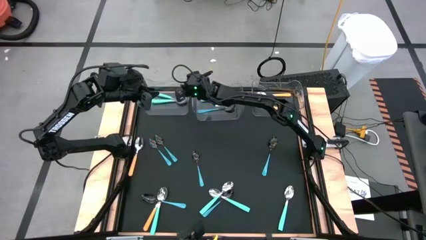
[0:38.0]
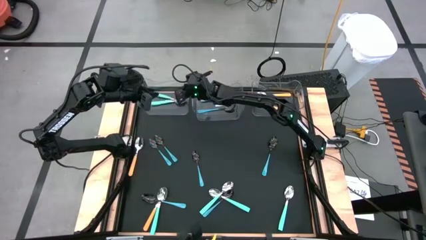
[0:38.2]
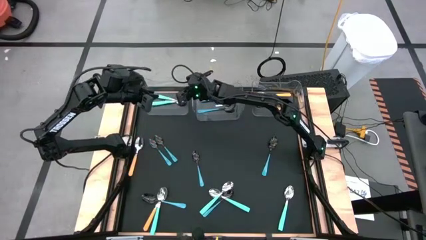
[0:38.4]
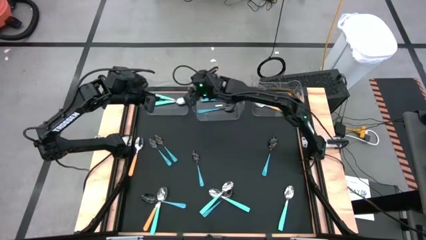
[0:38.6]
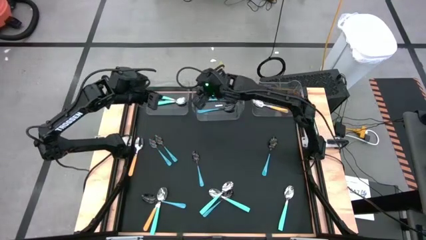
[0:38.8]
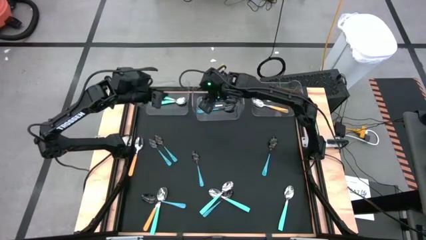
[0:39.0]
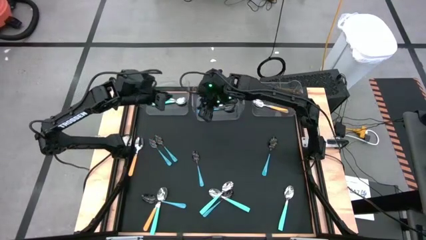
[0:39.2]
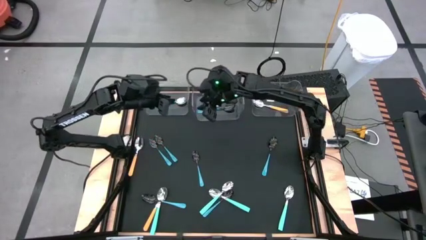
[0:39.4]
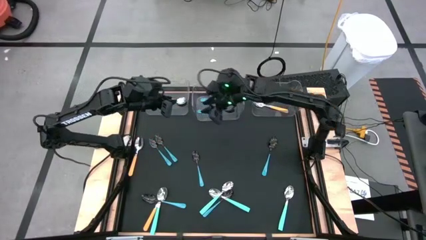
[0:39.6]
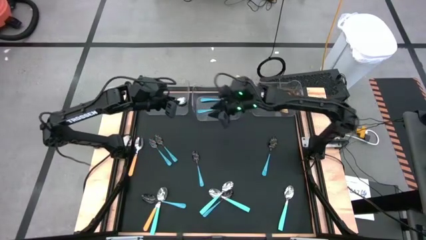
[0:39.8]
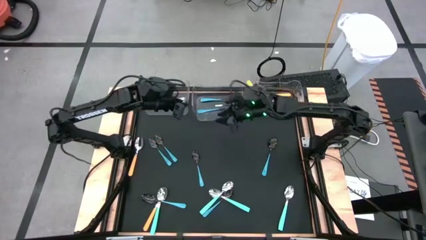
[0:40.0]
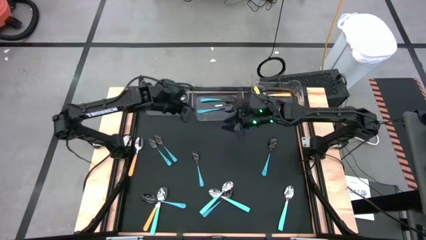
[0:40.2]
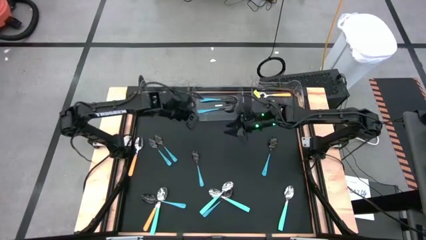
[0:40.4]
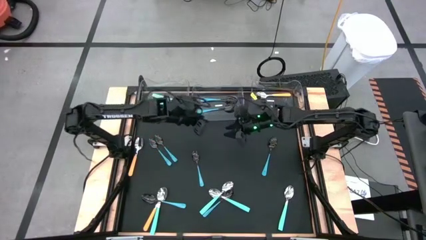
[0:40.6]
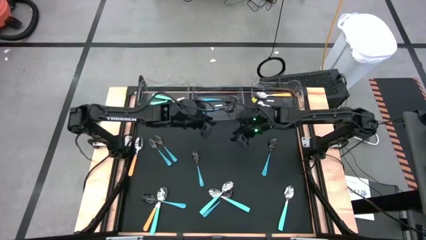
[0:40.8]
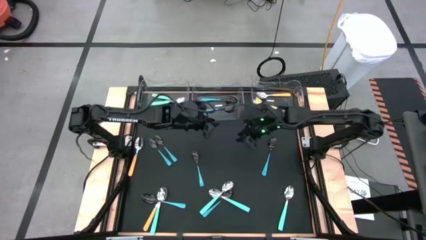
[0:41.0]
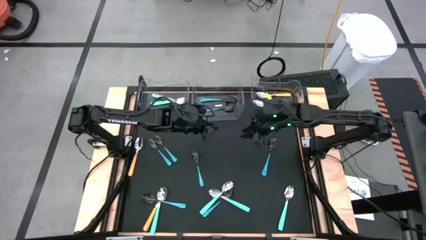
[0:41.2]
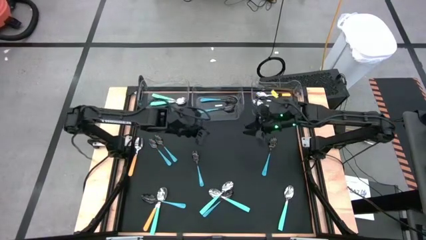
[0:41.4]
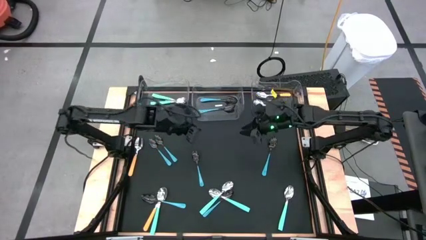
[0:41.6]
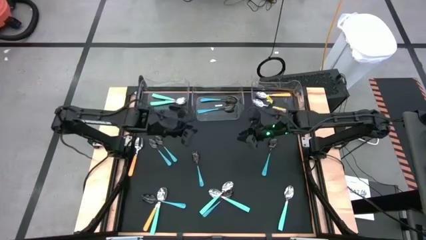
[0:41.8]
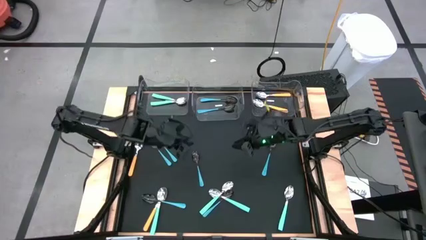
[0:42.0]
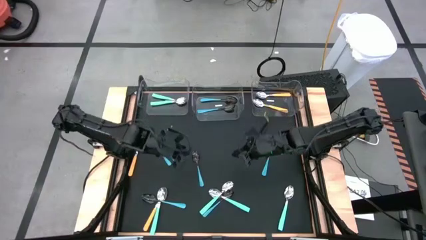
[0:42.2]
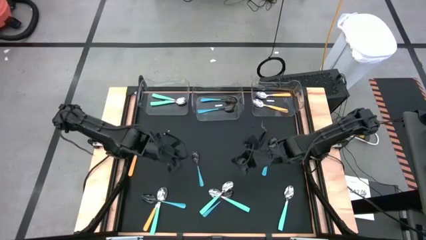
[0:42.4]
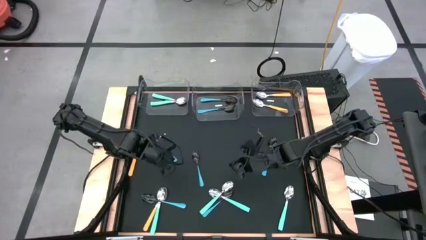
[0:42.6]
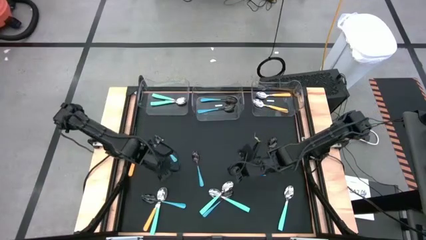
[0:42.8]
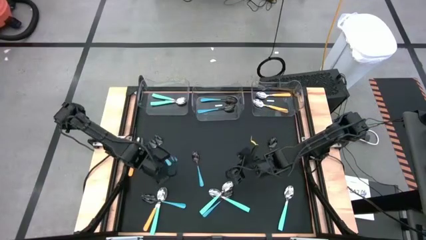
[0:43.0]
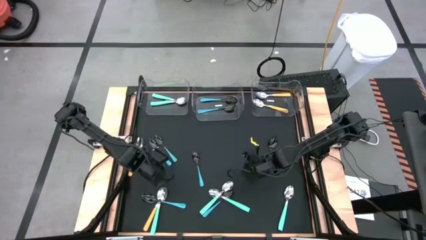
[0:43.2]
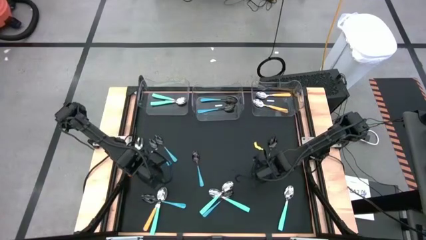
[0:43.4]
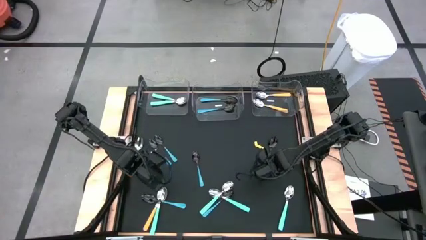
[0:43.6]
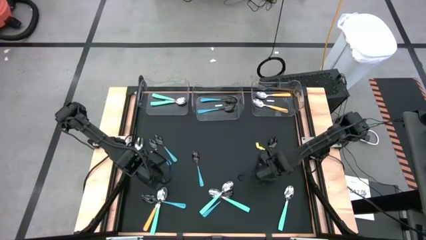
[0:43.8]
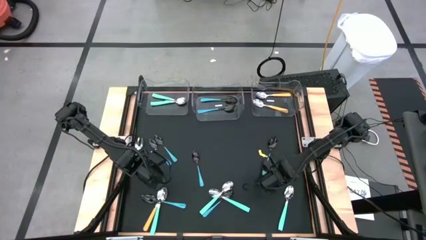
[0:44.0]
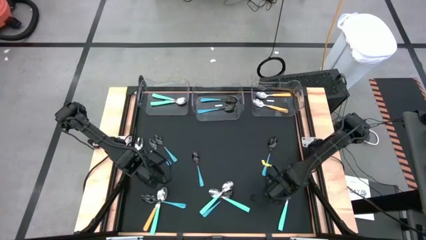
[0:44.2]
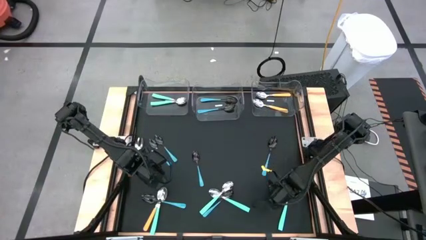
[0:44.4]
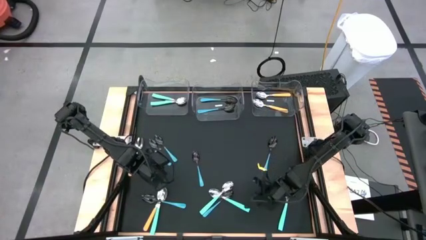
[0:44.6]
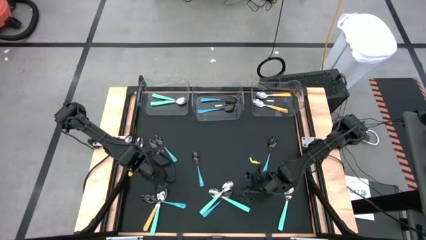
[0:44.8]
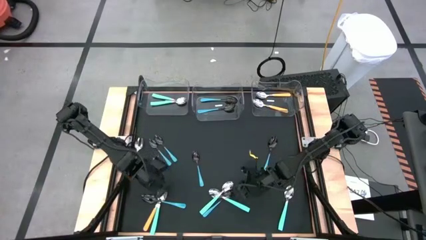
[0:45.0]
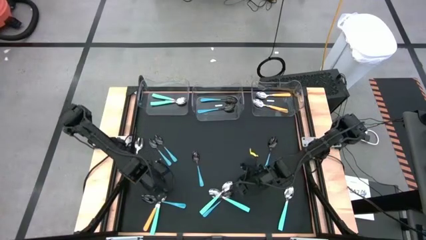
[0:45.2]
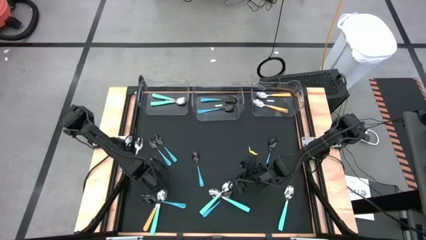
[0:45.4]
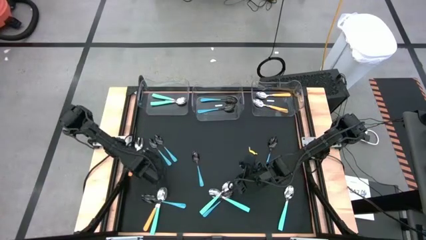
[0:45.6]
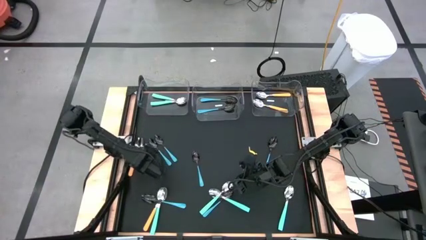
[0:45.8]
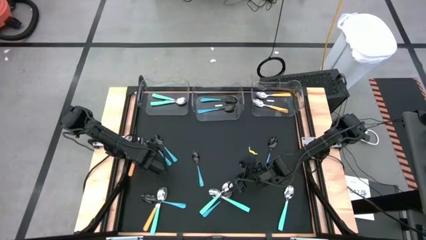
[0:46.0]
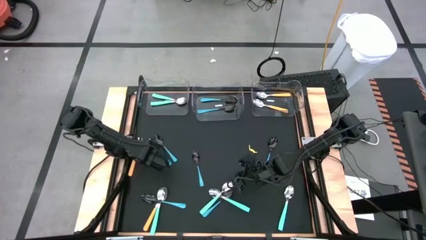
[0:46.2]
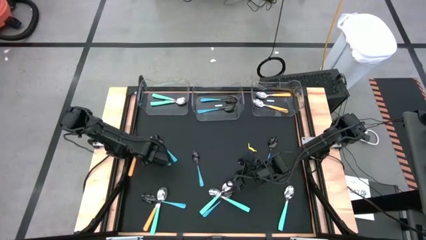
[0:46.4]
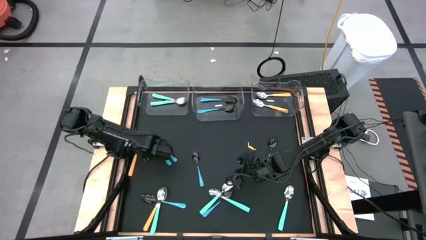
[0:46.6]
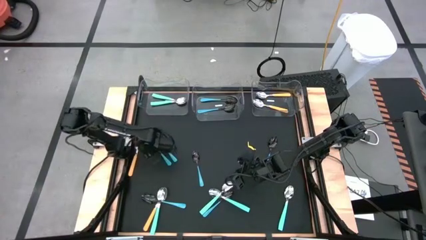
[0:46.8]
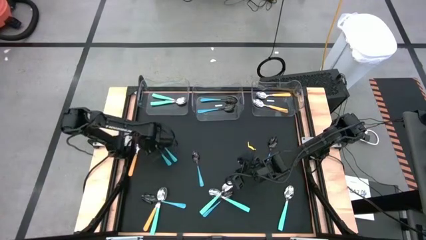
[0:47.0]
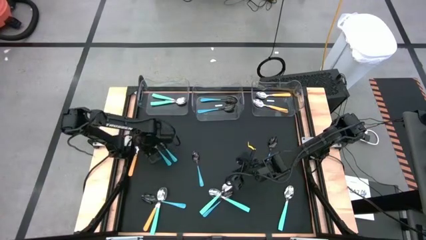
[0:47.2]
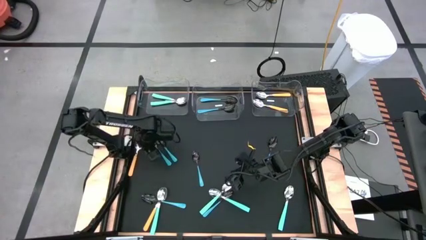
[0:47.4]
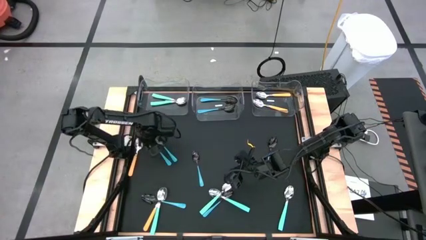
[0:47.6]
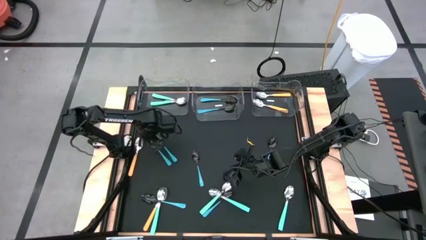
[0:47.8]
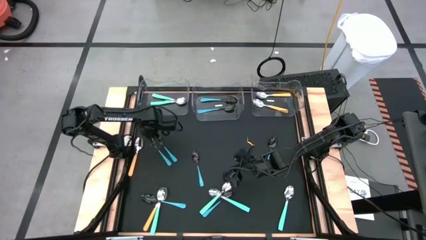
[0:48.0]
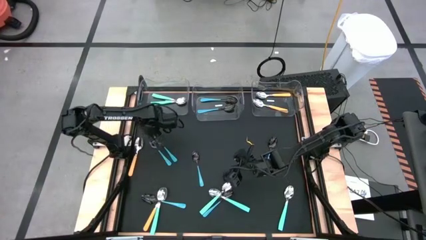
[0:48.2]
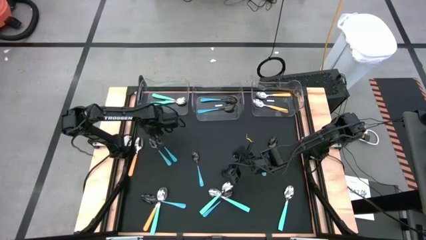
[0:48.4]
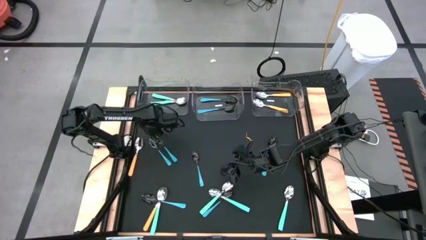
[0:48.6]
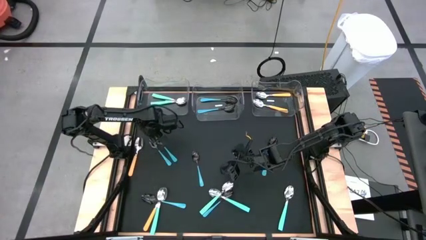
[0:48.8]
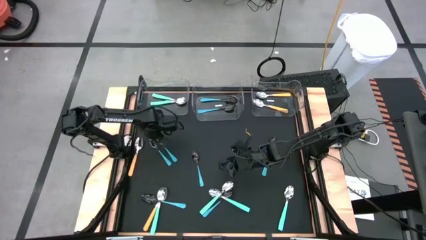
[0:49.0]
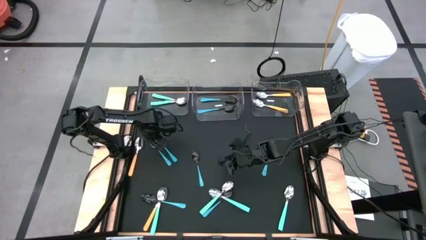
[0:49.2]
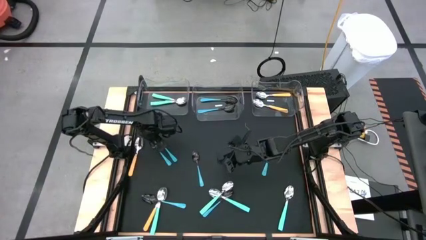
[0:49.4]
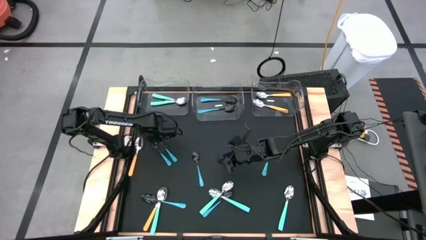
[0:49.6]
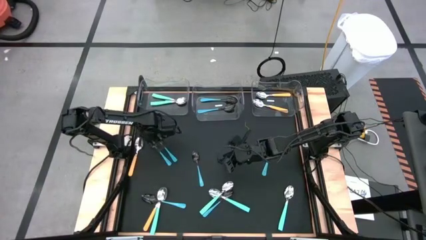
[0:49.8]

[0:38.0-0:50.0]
Task: Sort silverware by color (type)
Put the orange spoon into the right transparent bin
